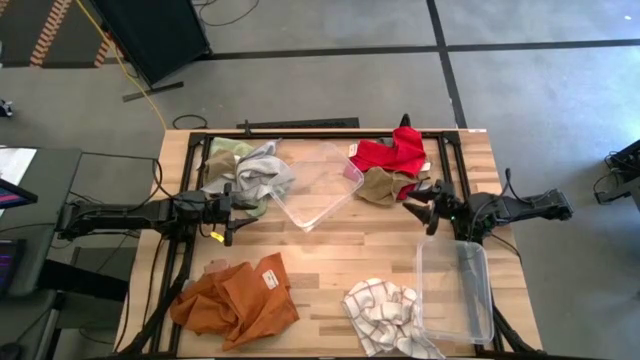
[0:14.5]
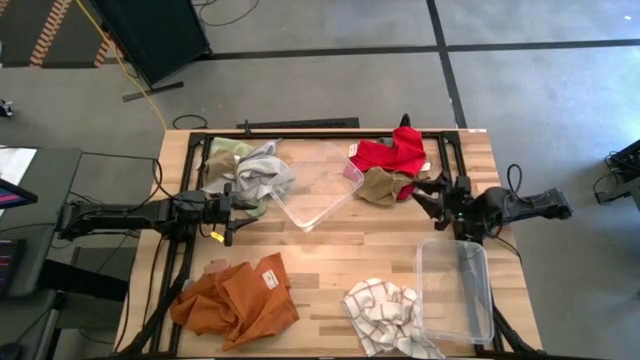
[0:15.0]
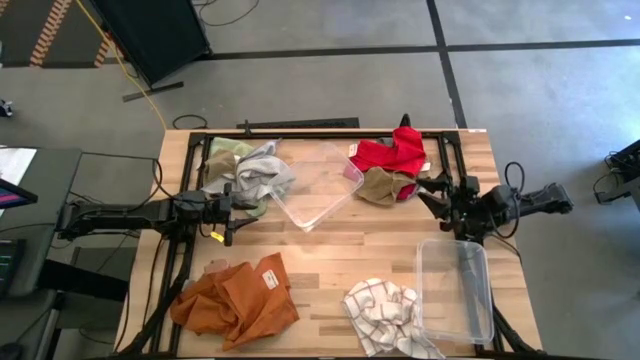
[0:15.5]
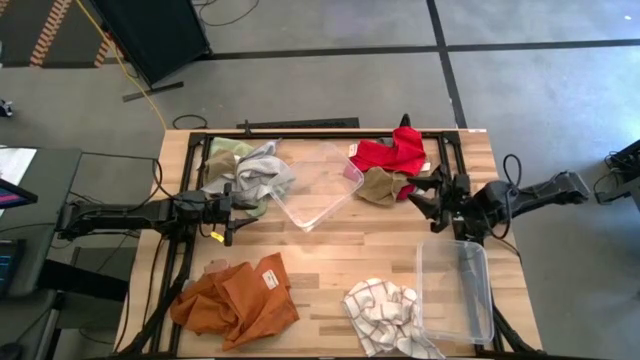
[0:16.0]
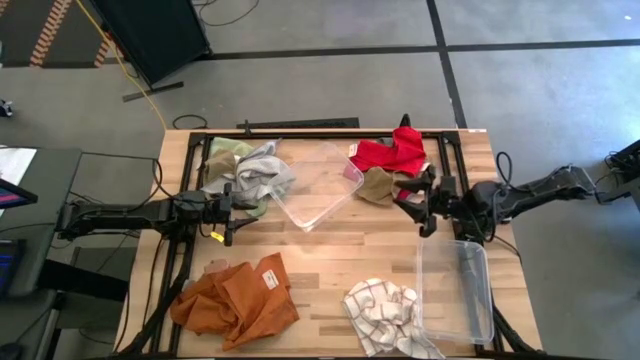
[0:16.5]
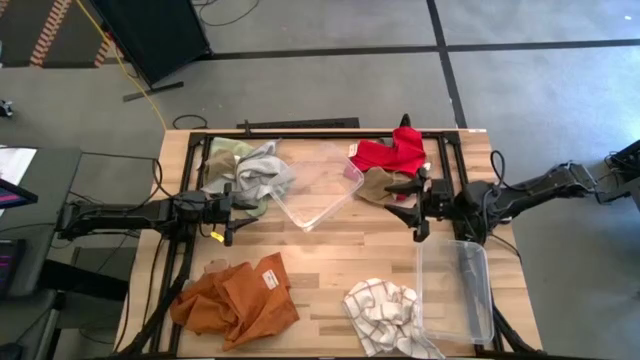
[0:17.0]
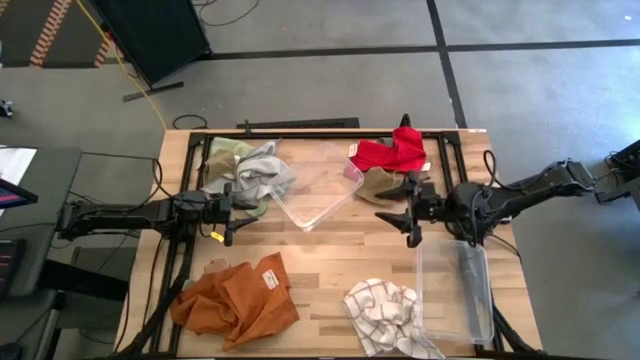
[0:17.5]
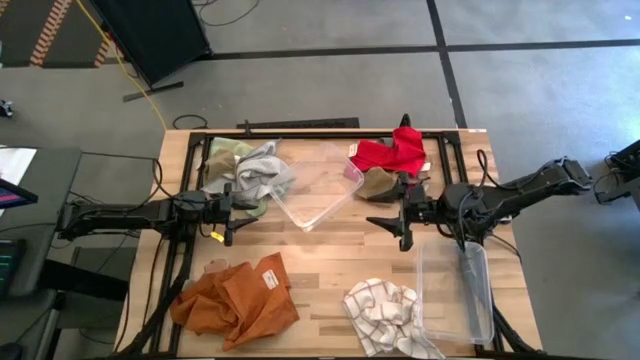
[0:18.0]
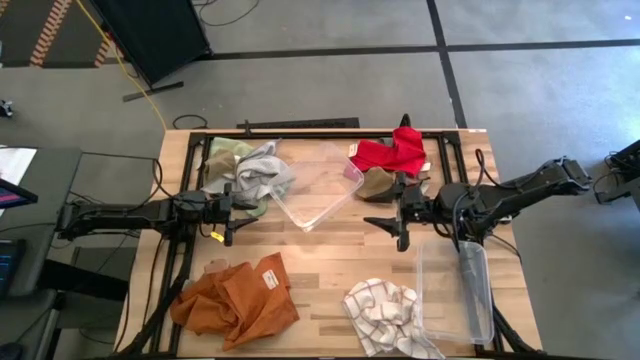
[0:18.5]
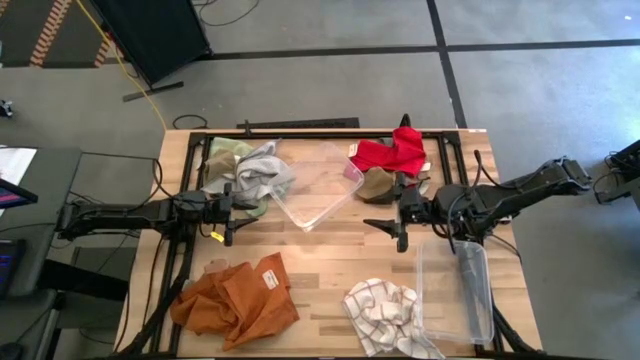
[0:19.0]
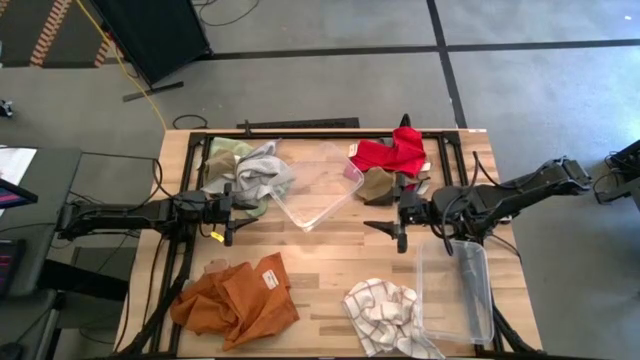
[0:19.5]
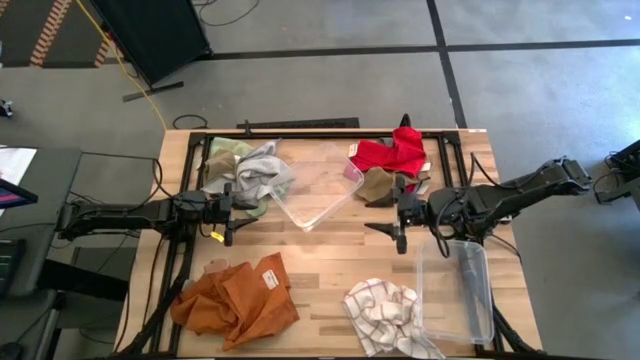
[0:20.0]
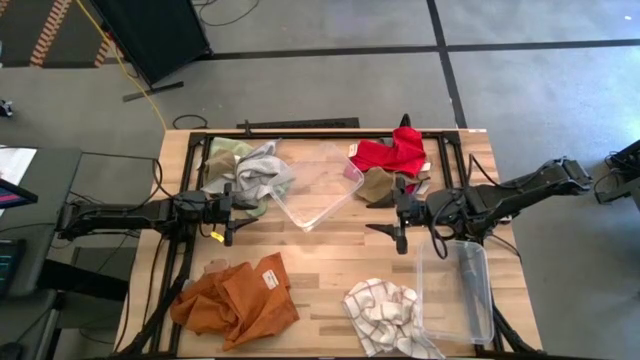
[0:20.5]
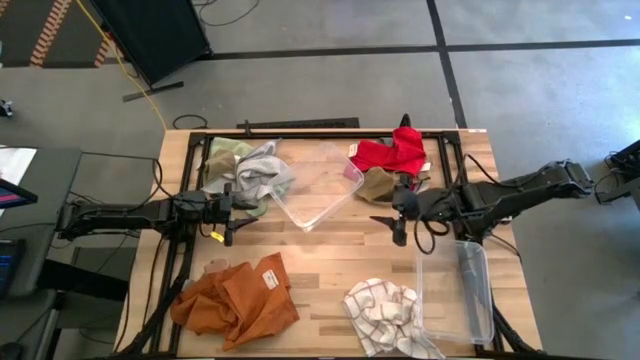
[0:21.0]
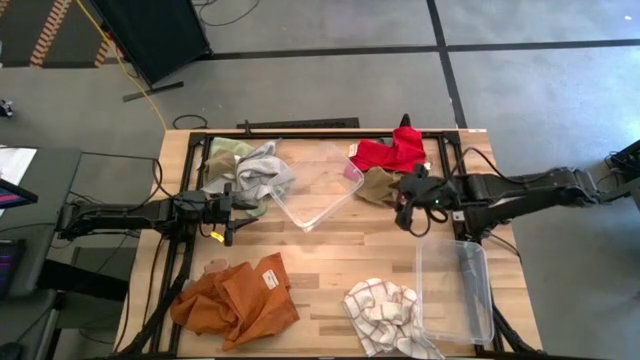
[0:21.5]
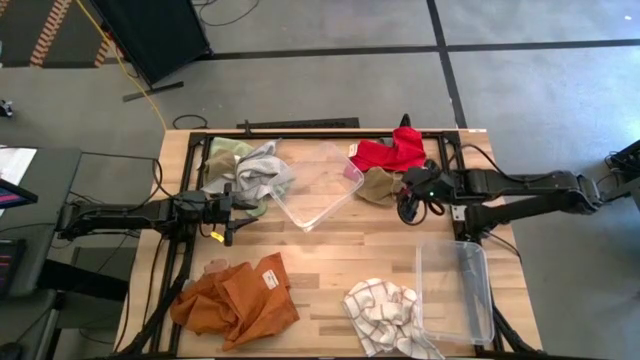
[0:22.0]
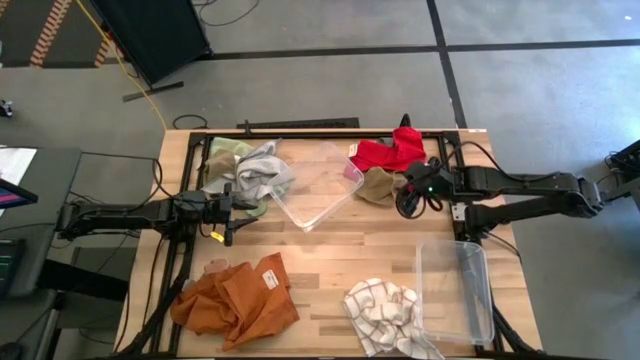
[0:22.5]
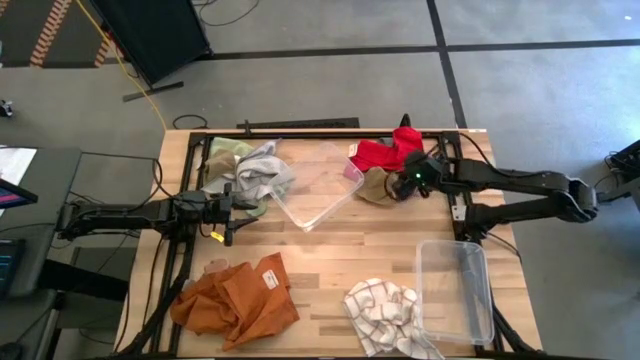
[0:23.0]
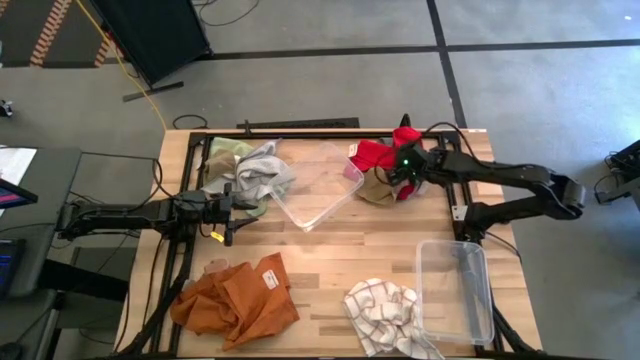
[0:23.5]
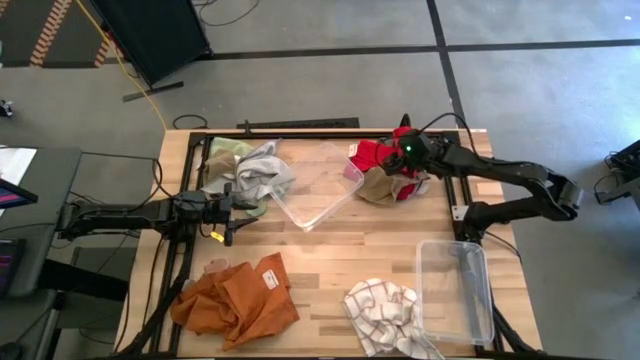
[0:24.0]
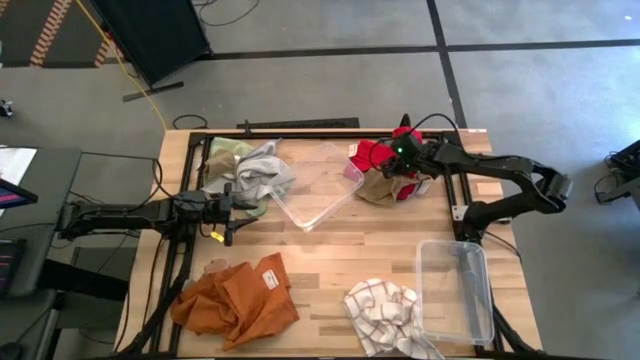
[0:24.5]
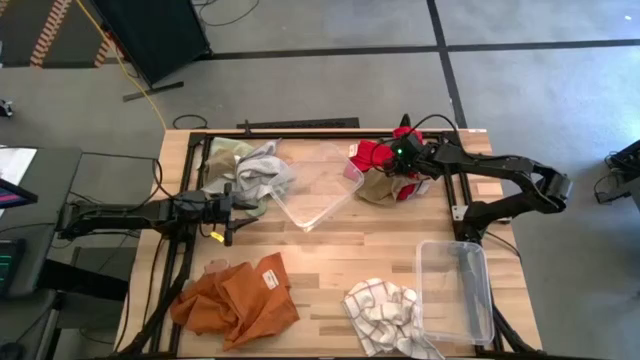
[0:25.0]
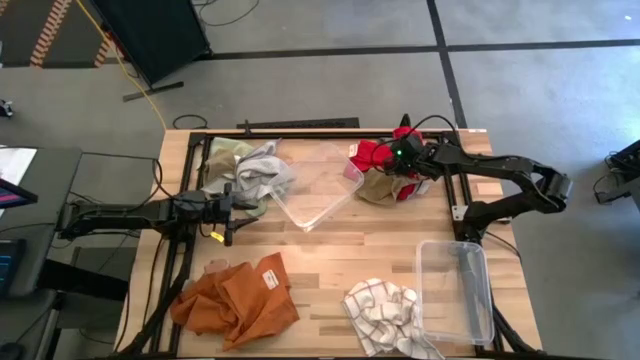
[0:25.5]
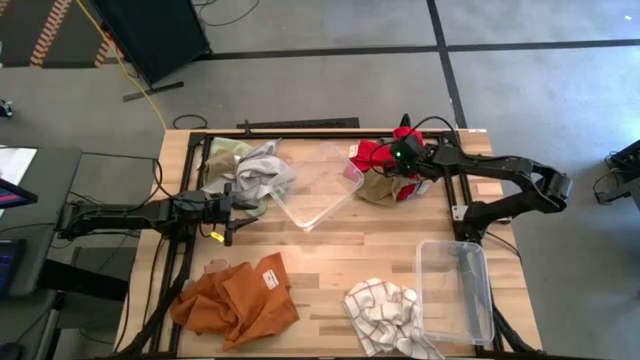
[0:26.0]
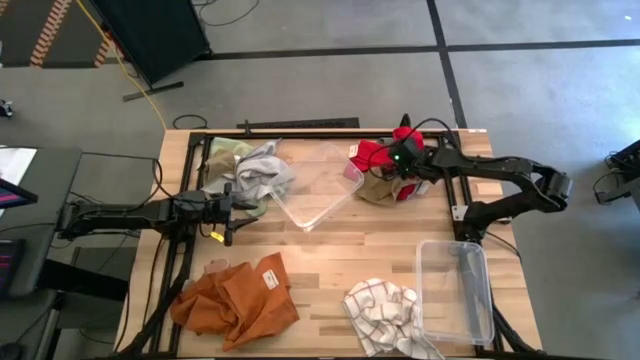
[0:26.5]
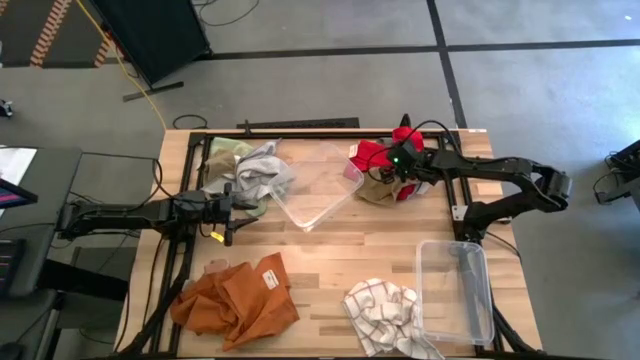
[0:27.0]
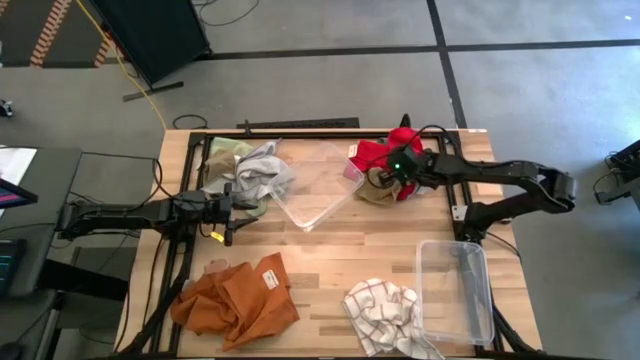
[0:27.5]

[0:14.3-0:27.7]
Task: Sort towels by color in basket
Put the red towel into the top transparent bin

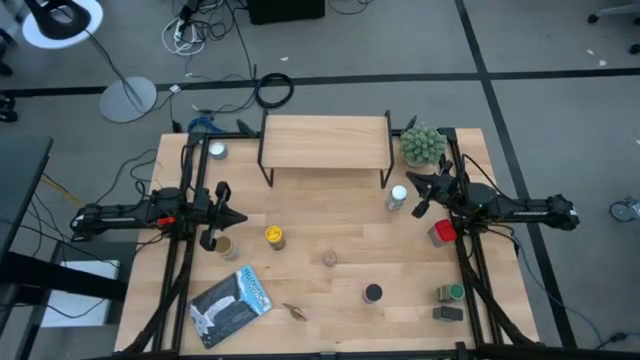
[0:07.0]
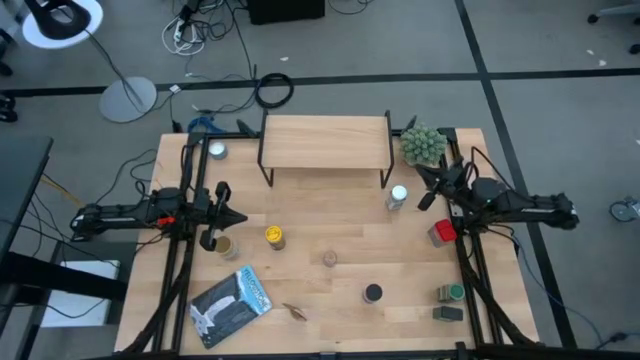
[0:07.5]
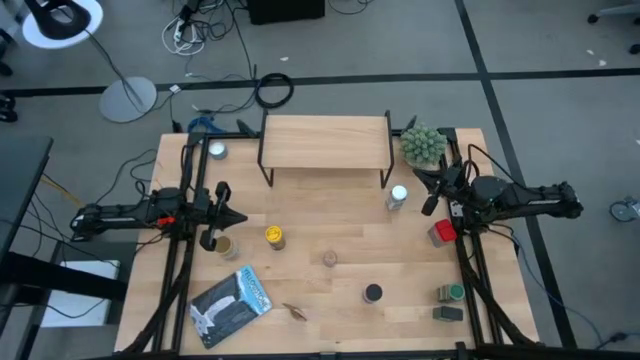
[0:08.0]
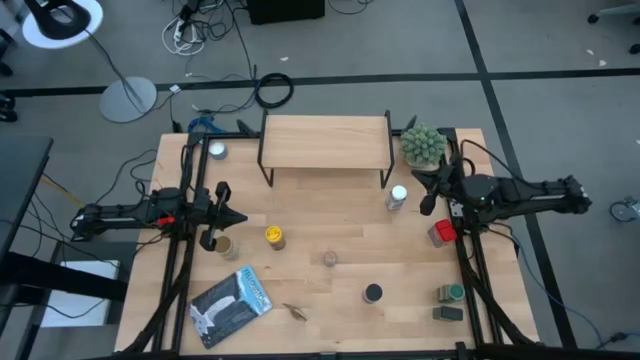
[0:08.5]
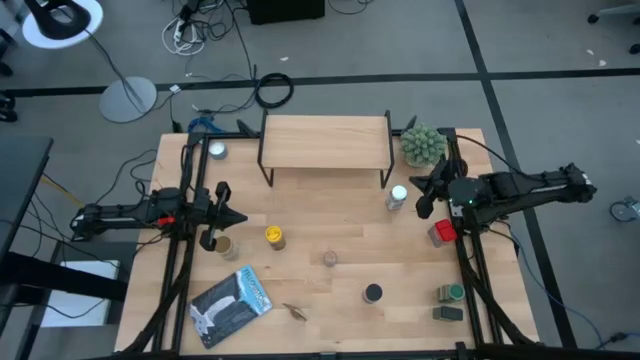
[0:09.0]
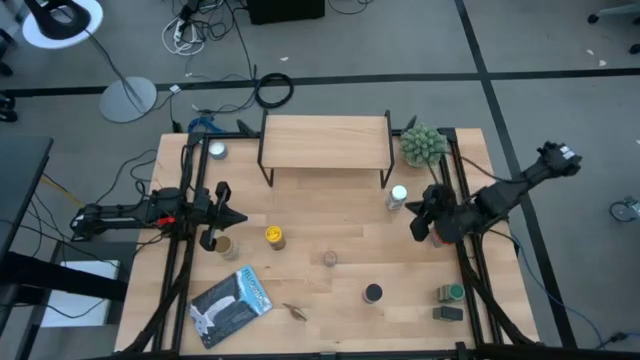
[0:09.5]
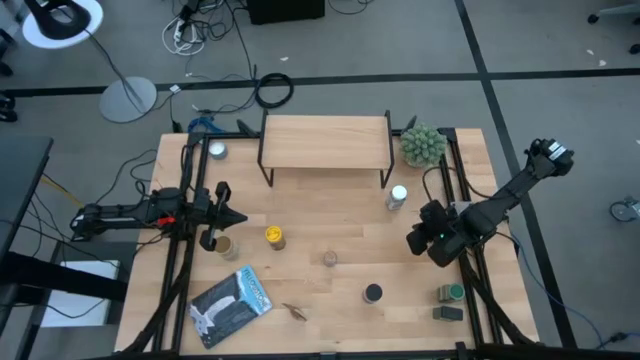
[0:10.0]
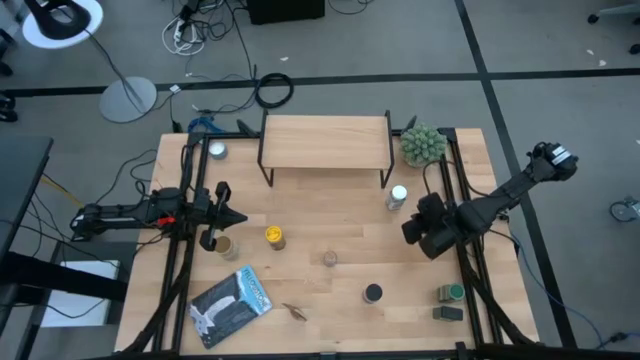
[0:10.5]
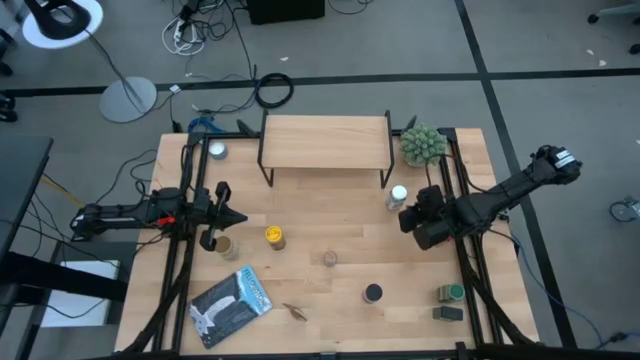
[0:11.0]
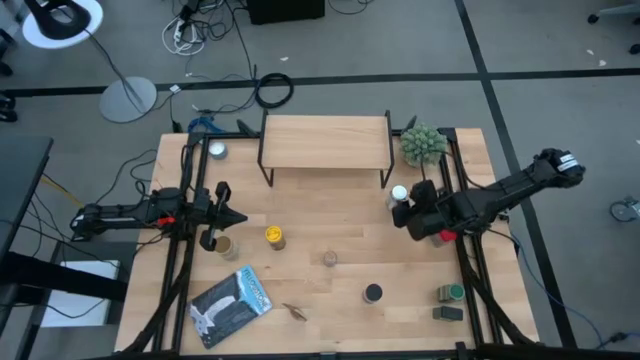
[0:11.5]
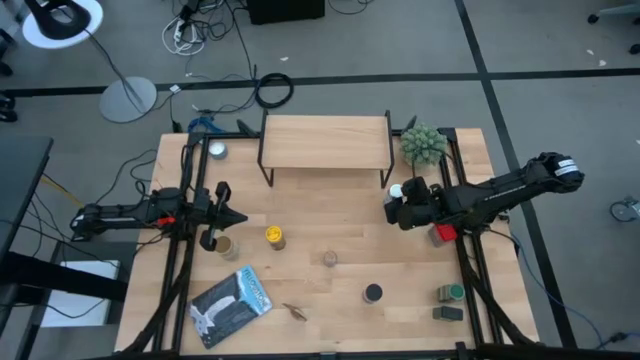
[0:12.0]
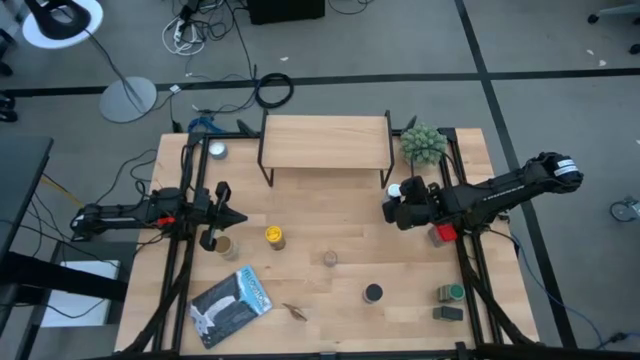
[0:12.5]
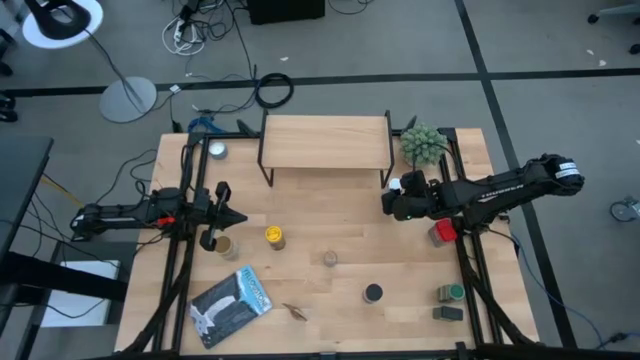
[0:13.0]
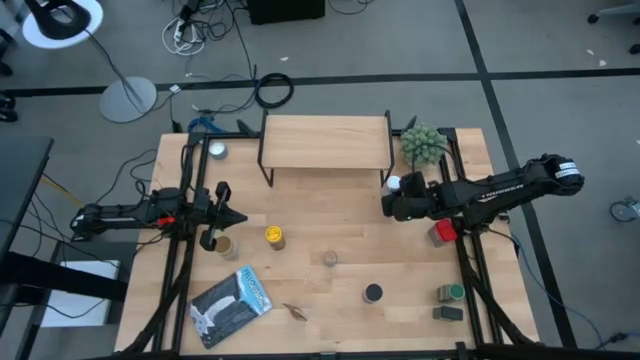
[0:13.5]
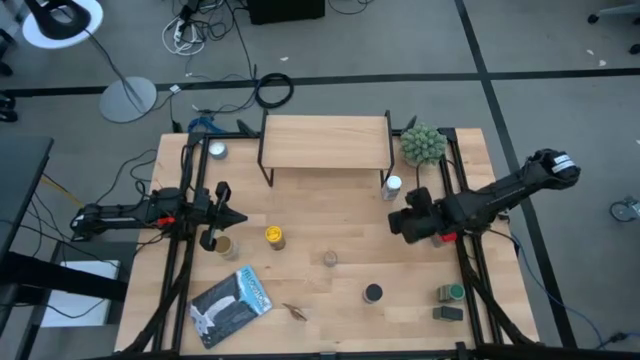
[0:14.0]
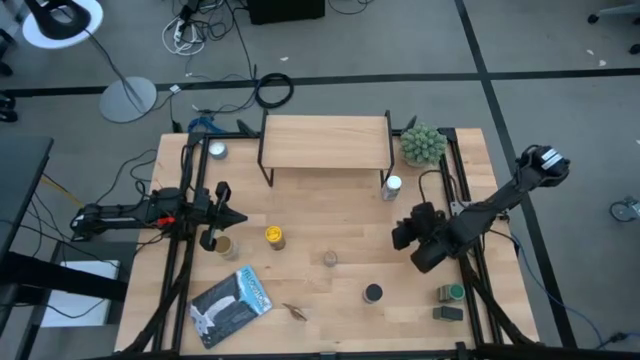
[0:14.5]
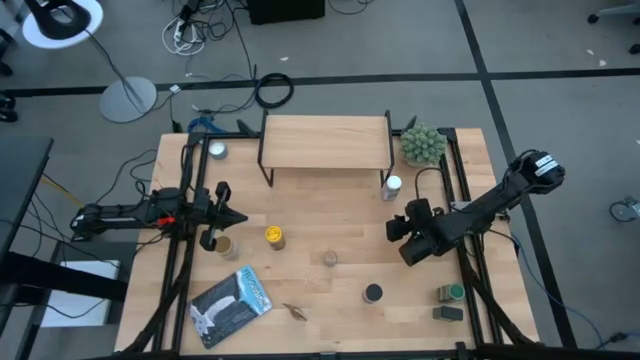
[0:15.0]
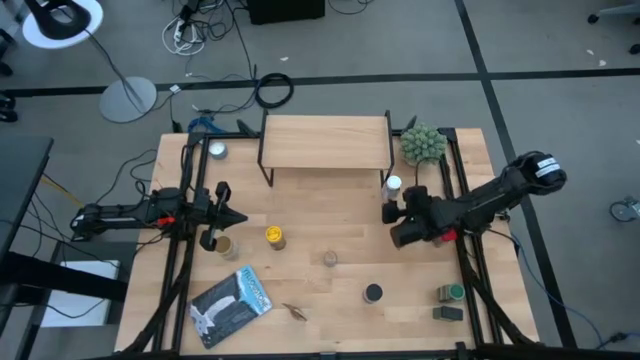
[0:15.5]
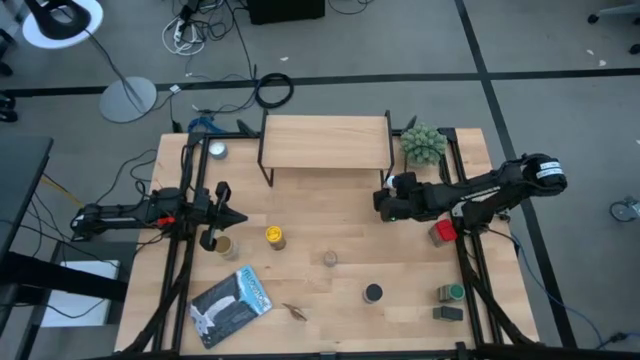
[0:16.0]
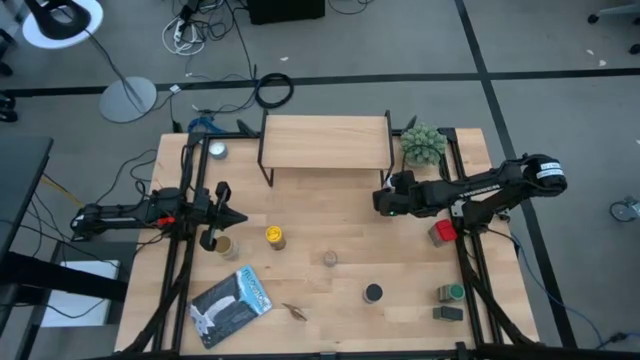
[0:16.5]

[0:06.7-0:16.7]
Task: Shelf spices
Put the white seasoning bottle on the shelf
